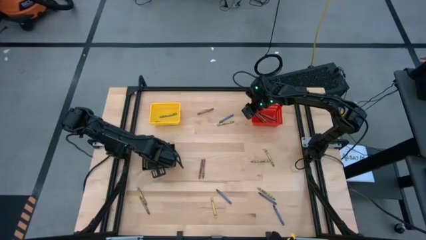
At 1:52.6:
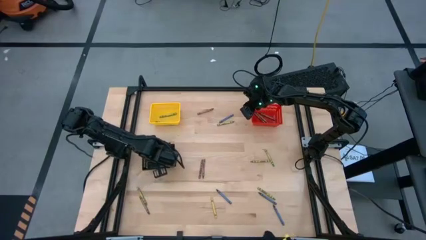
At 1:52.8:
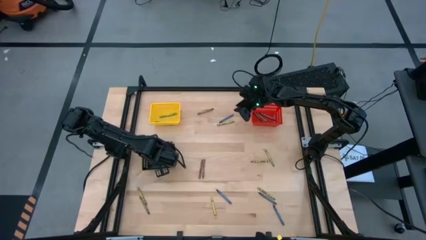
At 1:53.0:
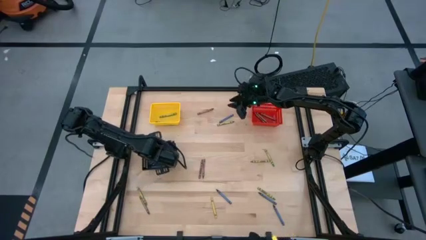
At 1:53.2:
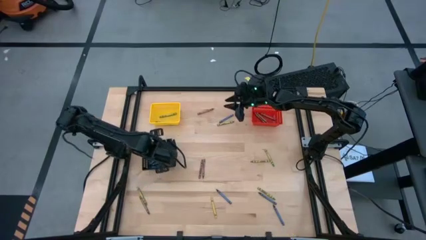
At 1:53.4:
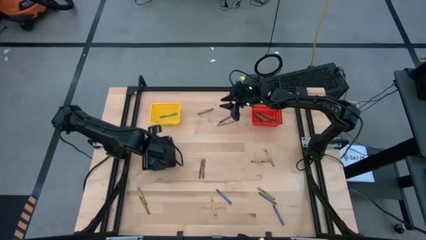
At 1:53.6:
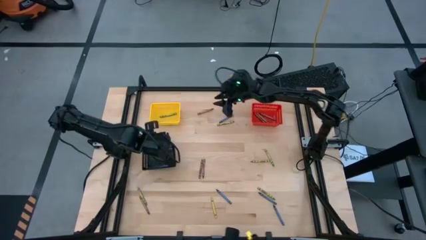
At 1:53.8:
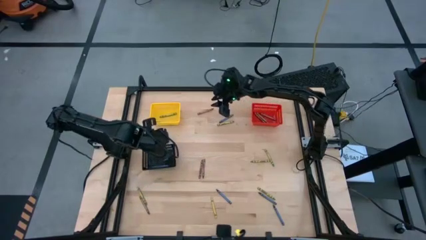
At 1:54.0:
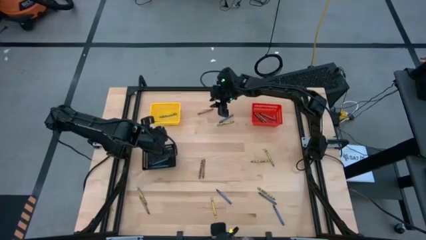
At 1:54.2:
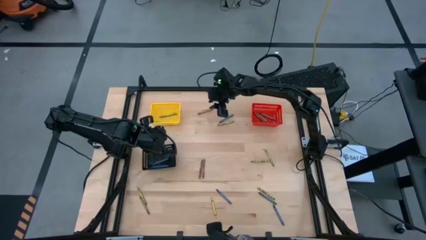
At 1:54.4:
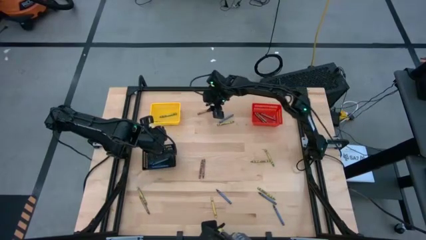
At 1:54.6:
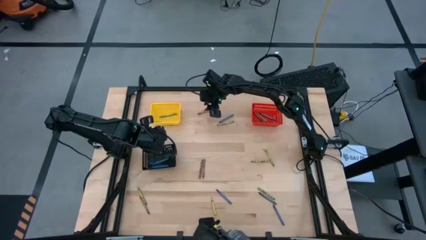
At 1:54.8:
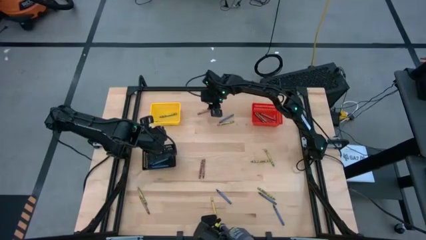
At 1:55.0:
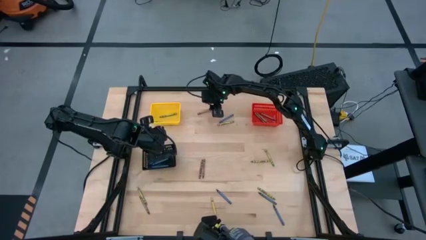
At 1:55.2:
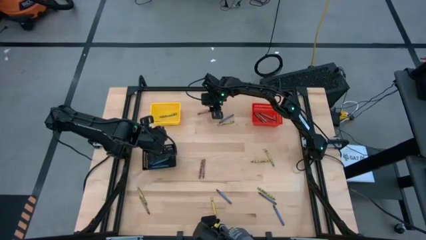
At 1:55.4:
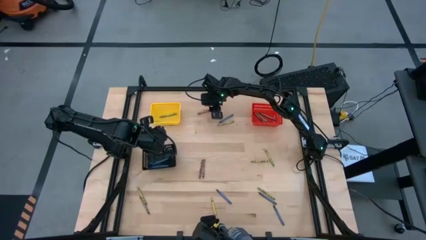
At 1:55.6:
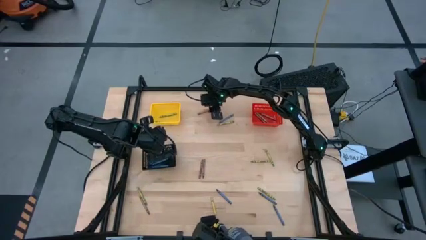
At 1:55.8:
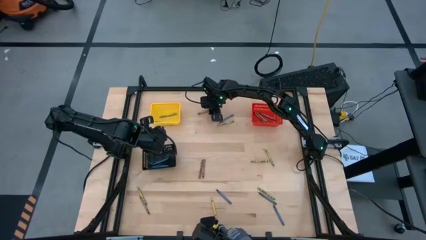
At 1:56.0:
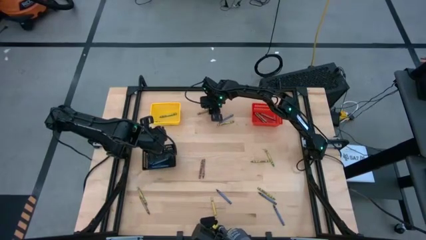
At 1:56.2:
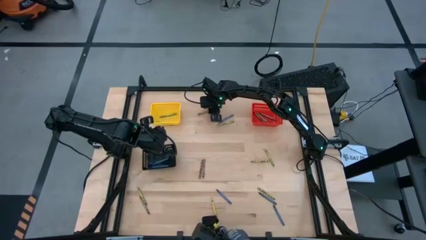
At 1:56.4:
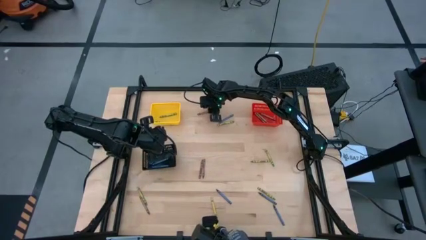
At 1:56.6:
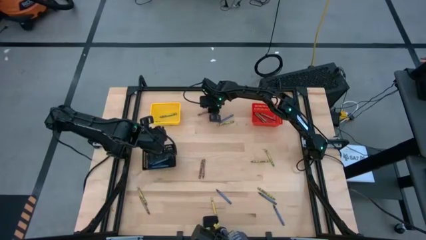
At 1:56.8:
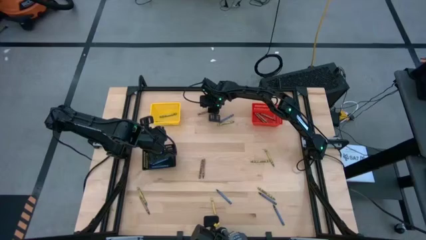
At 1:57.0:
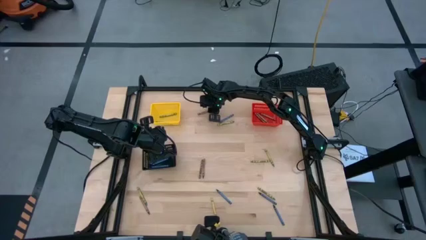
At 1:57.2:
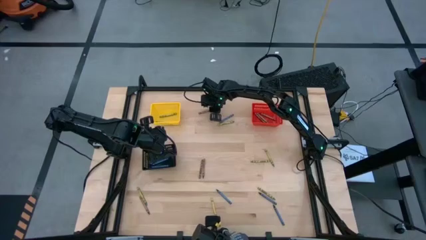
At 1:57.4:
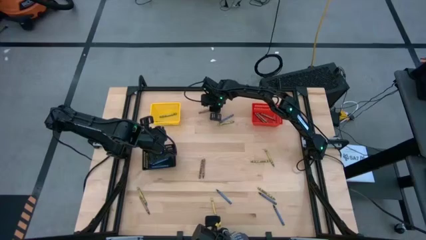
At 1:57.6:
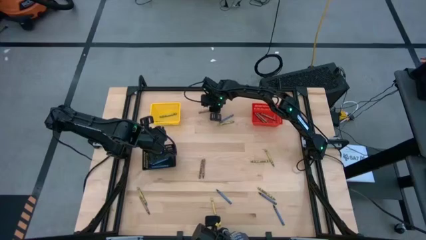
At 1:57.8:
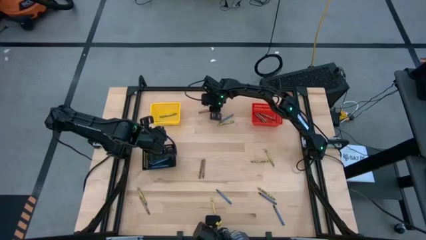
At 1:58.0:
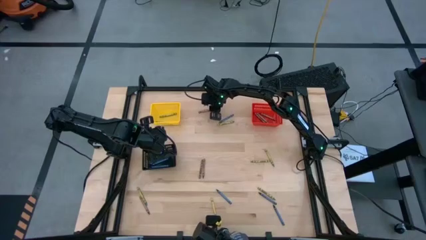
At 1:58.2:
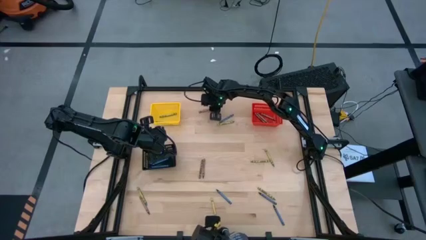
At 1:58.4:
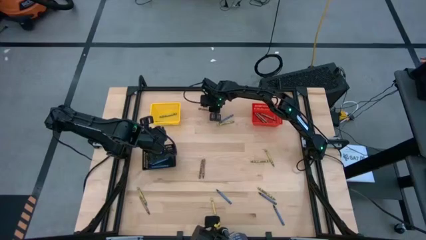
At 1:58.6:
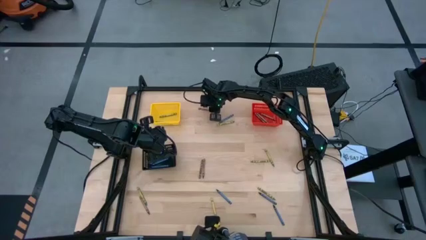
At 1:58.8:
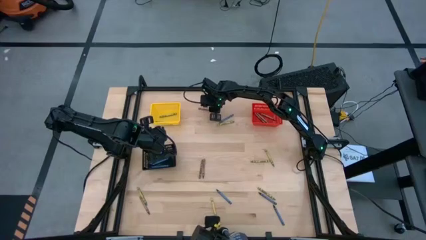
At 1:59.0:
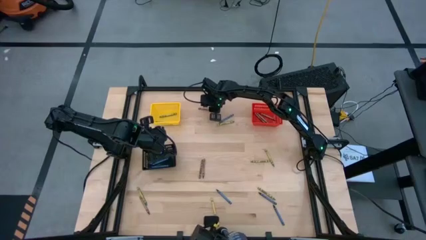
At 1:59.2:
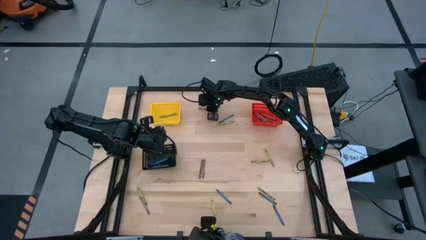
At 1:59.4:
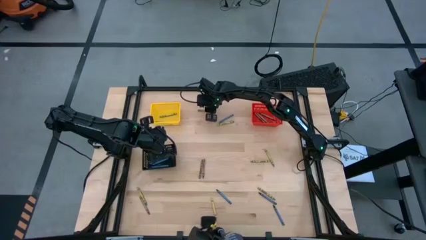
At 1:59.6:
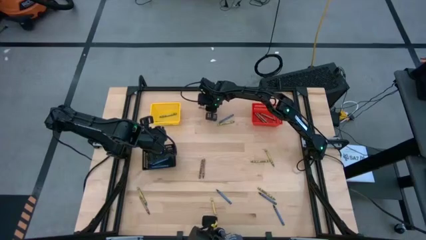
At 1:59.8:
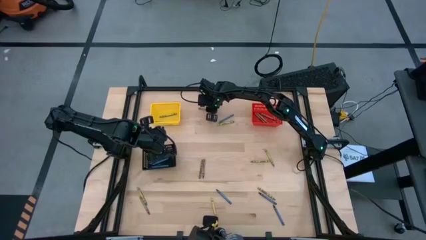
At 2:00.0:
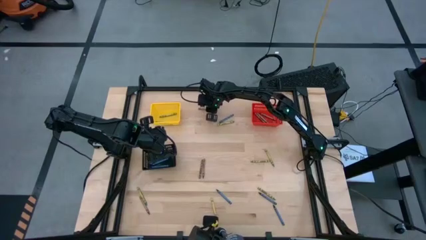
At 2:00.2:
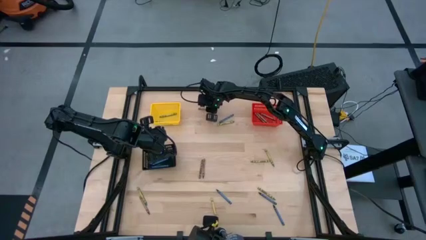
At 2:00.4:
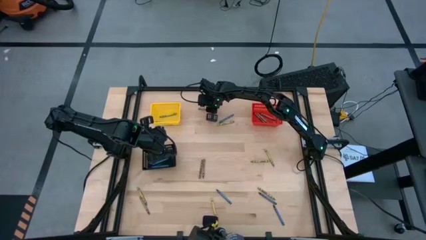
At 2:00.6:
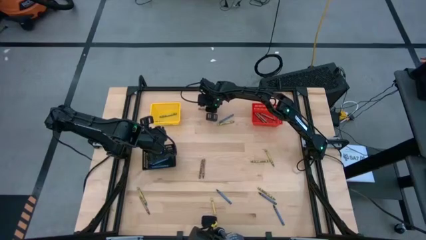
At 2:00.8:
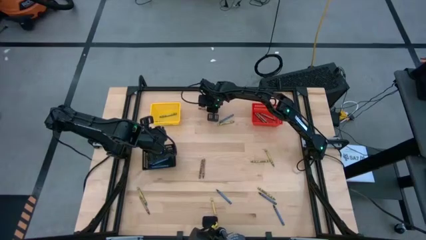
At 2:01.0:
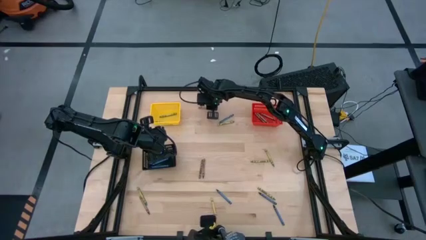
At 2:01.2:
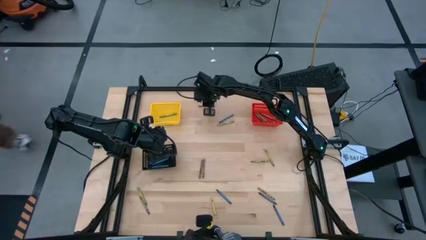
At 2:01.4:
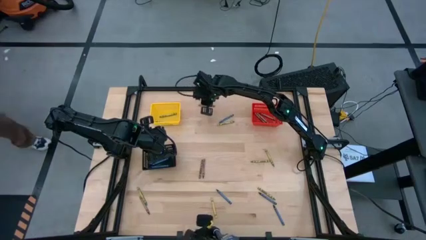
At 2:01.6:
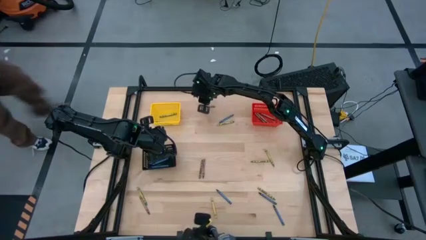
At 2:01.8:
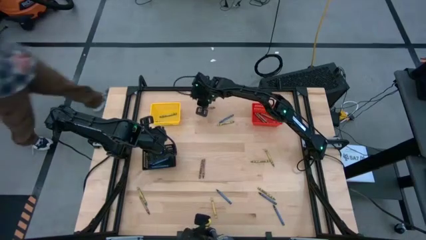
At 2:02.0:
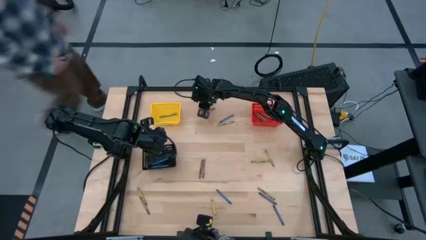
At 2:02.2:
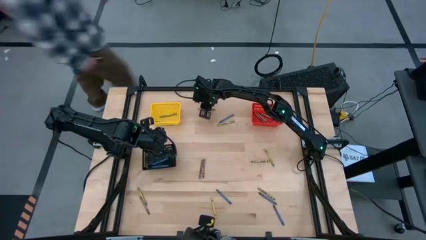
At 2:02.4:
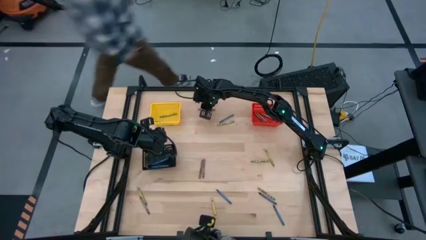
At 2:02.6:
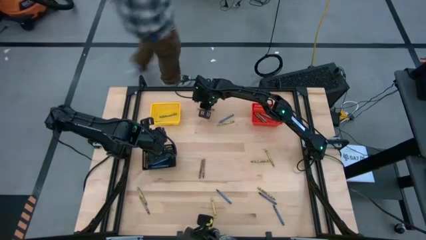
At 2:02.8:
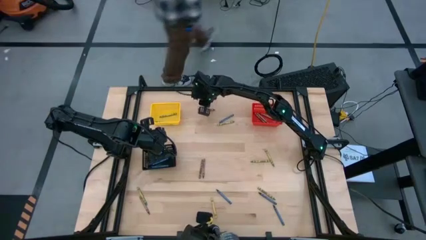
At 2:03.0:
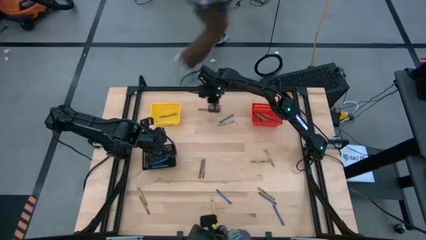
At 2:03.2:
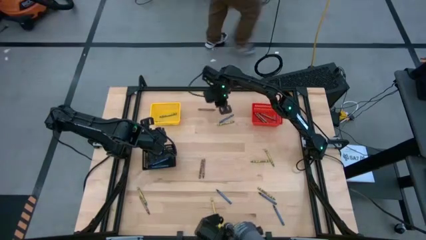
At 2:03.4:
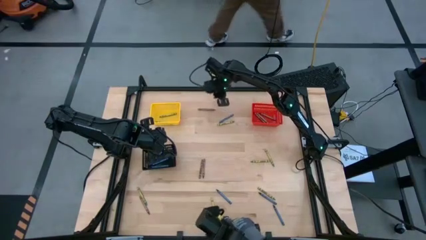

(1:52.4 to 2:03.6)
Task: Sort crayons
Put the brown crayon into the red bin
